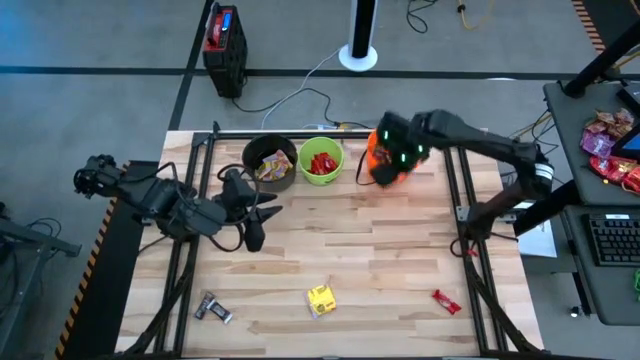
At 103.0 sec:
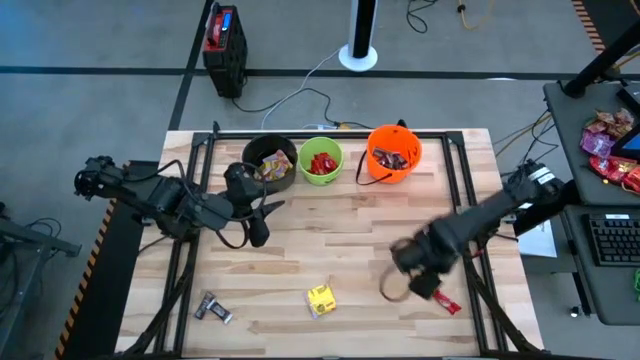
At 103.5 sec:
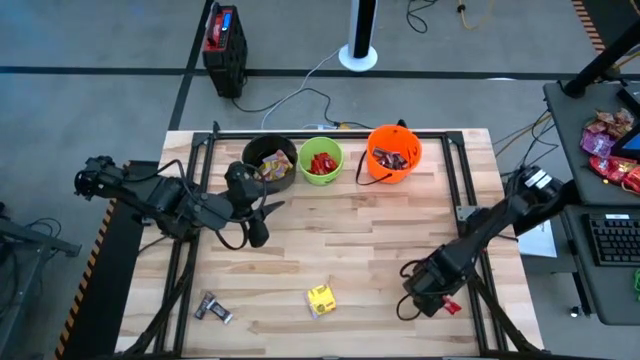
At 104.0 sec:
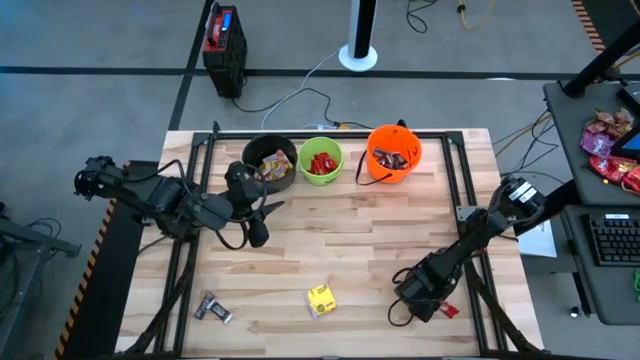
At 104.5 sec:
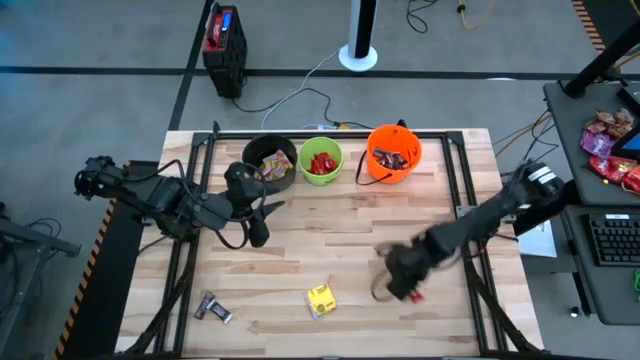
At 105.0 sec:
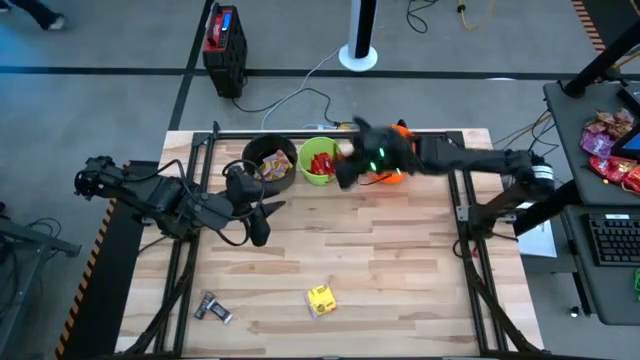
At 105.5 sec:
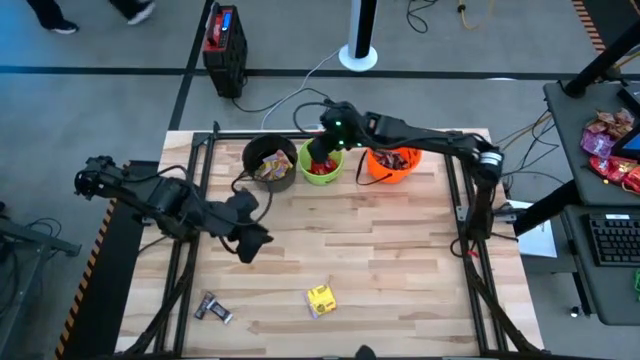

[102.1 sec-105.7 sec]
Task: Sort candy by brand, put in halloween buckets
Put the red chocolate bar into the green bucket

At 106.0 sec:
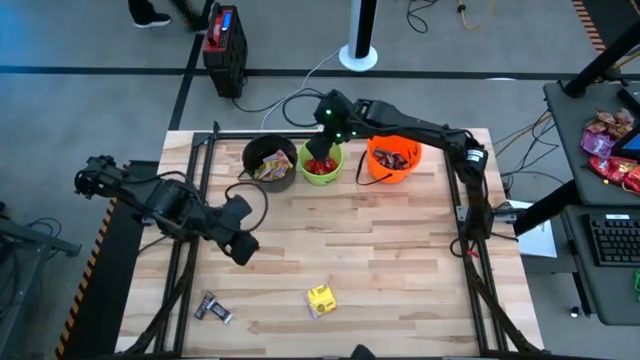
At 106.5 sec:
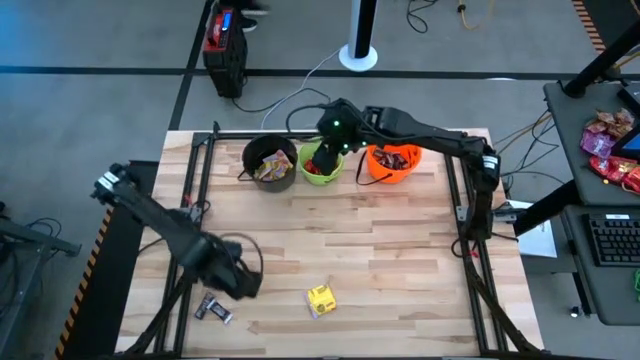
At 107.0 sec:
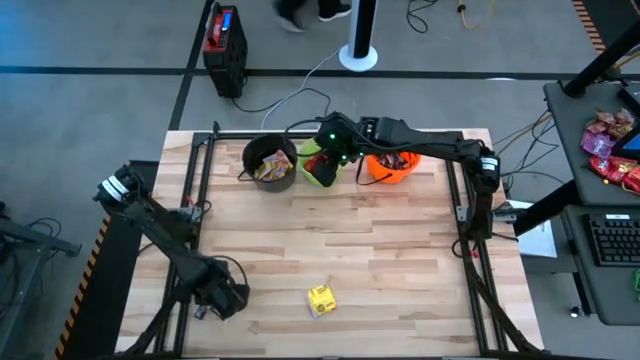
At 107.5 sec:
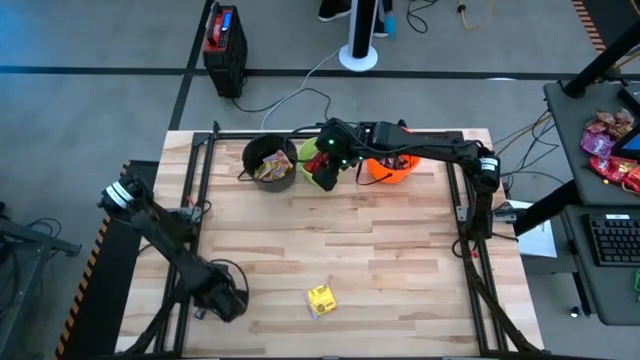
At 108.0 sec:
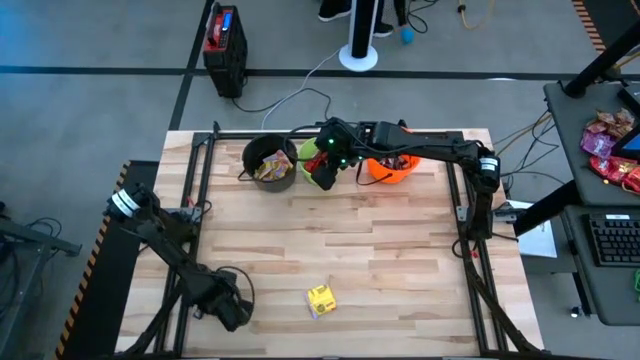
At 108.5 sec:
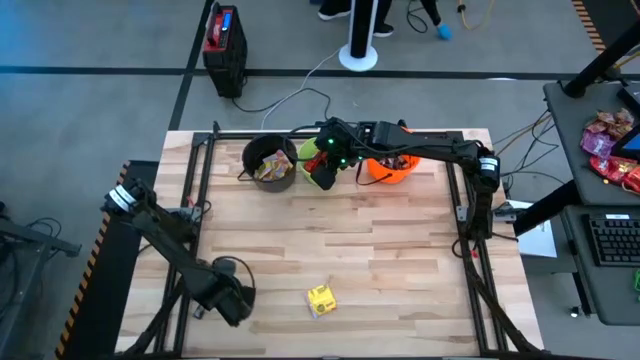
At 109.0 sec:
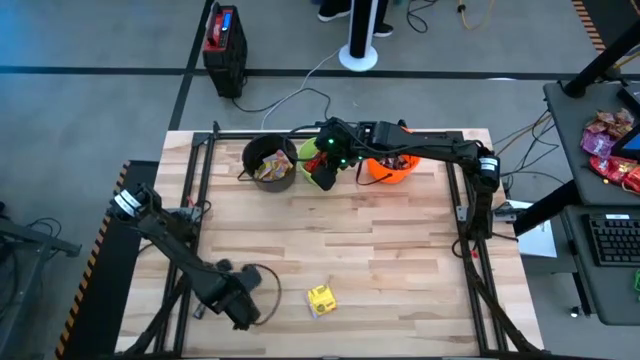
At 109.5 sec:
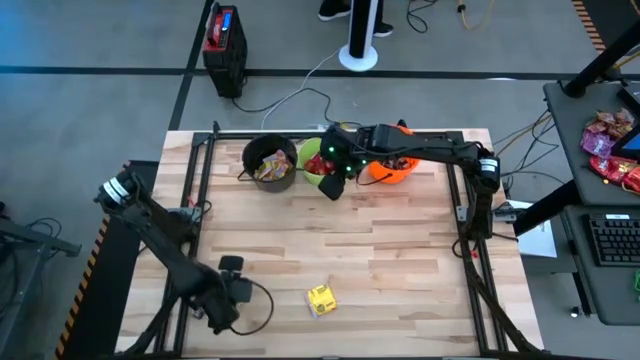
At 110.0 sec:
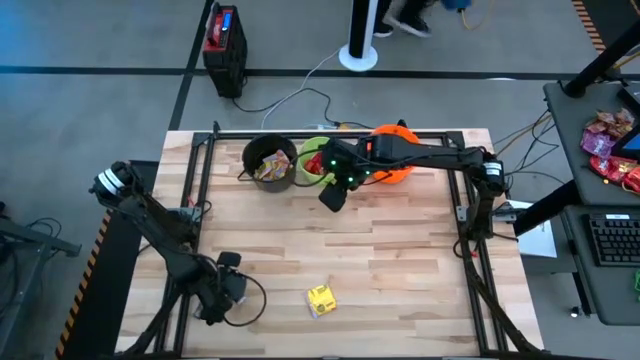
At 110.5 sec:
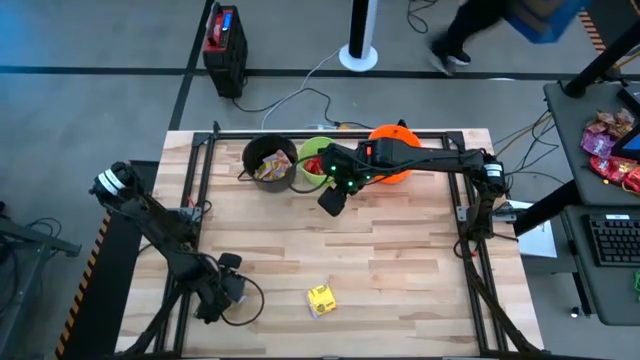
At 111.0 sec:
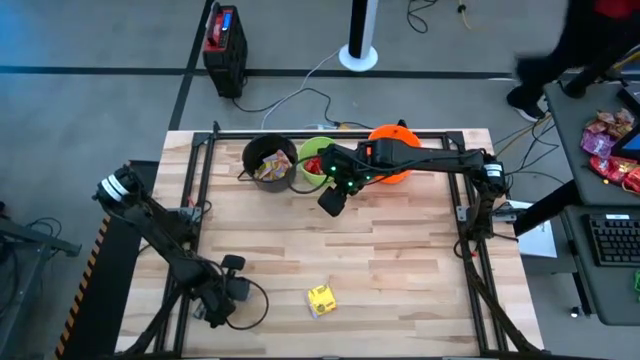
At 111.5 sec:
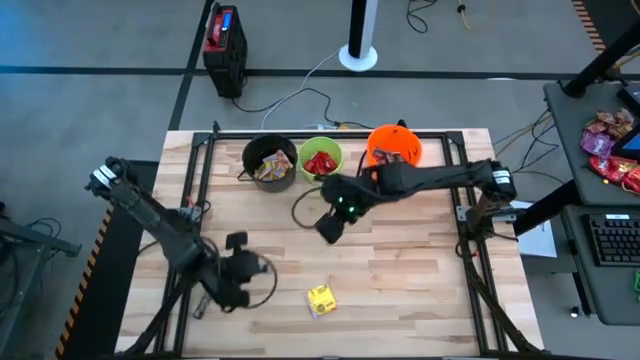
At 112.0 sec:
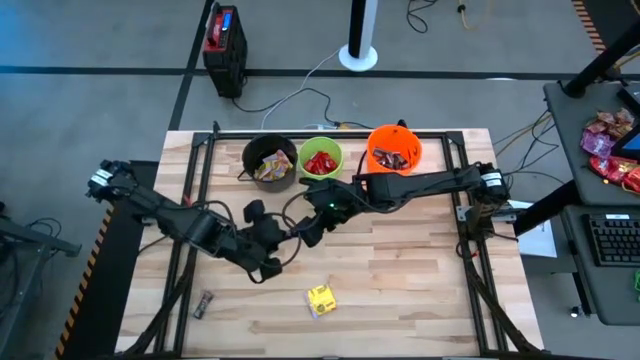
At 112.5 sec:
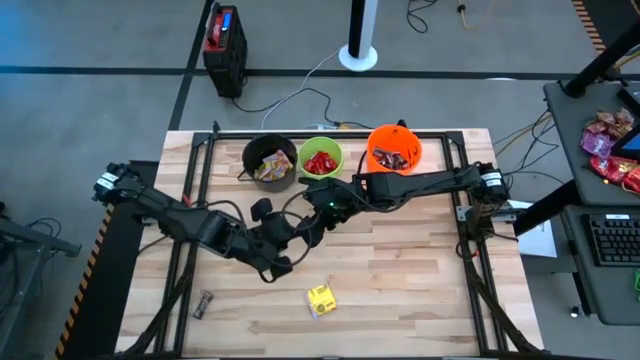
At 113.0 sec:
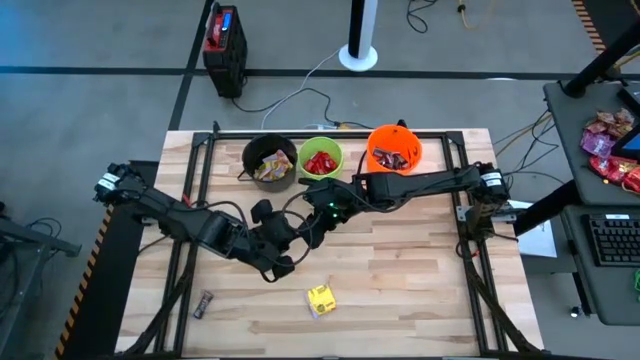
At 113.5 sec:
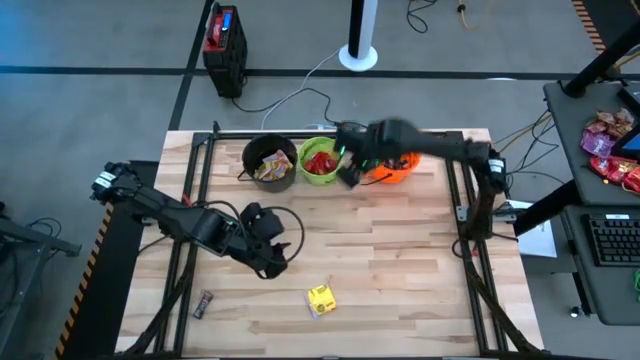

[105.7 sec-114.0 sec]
Put the brown chocolate bar into the orange bucket

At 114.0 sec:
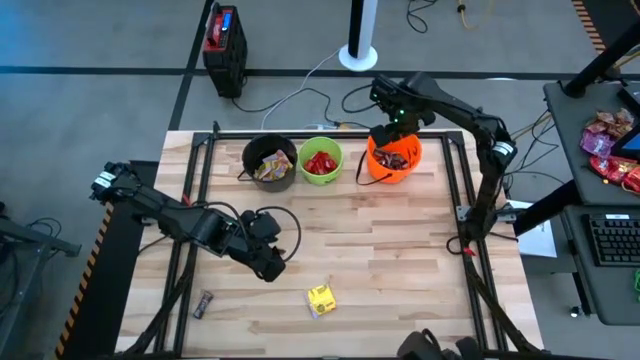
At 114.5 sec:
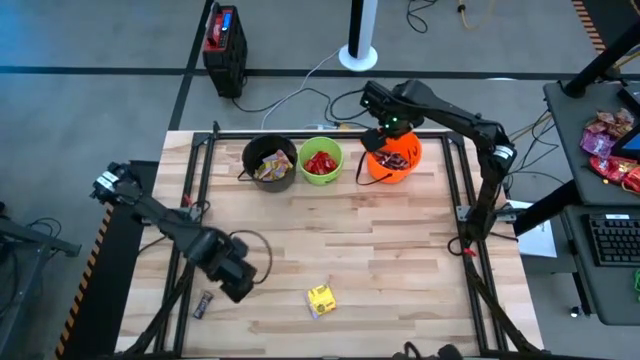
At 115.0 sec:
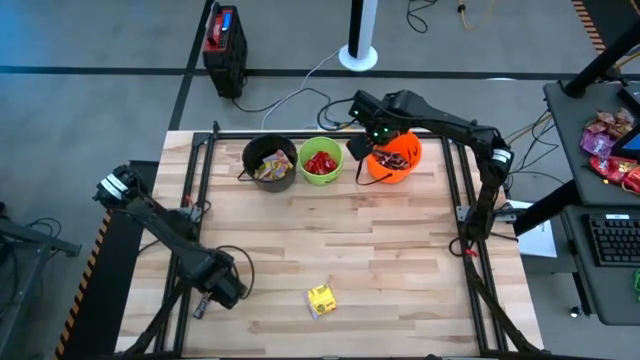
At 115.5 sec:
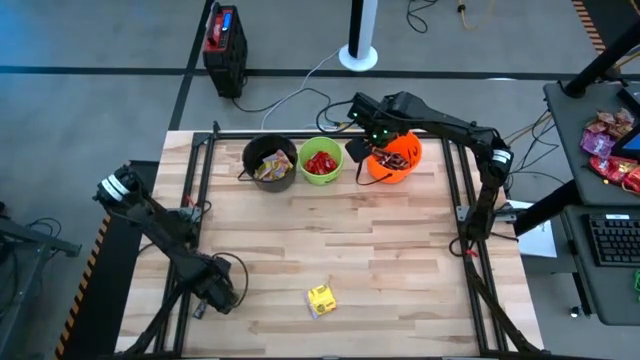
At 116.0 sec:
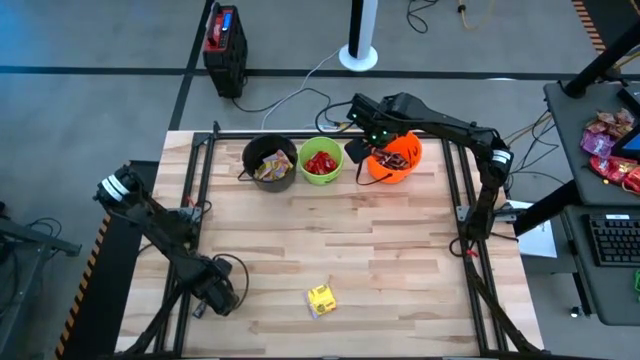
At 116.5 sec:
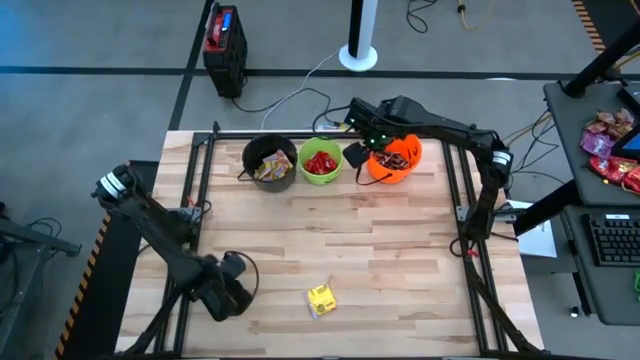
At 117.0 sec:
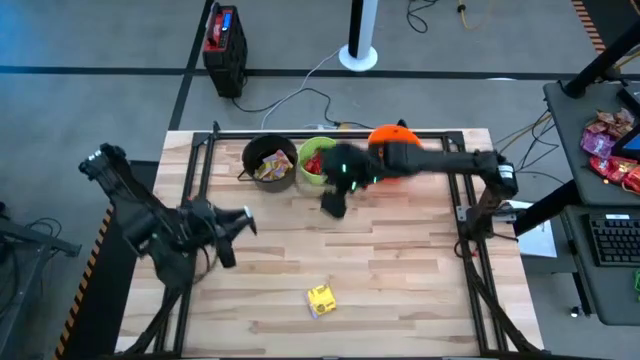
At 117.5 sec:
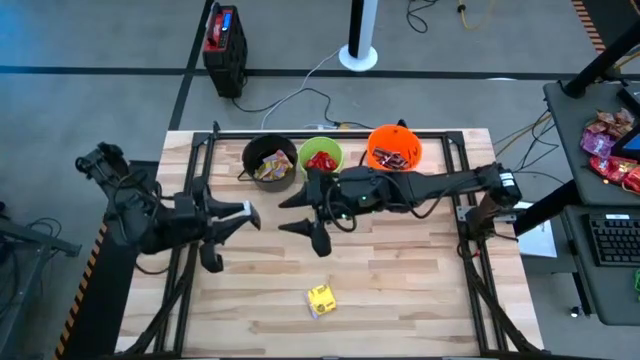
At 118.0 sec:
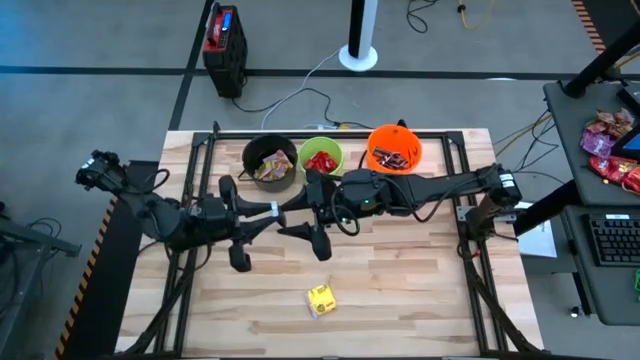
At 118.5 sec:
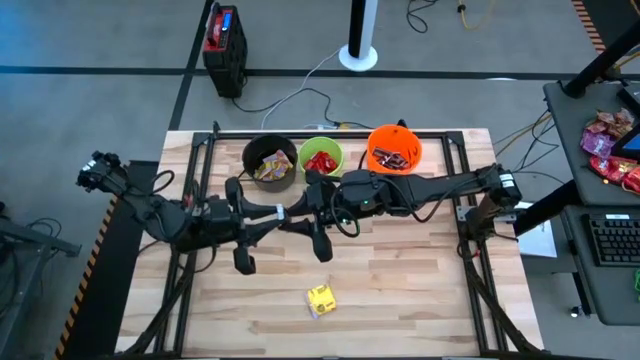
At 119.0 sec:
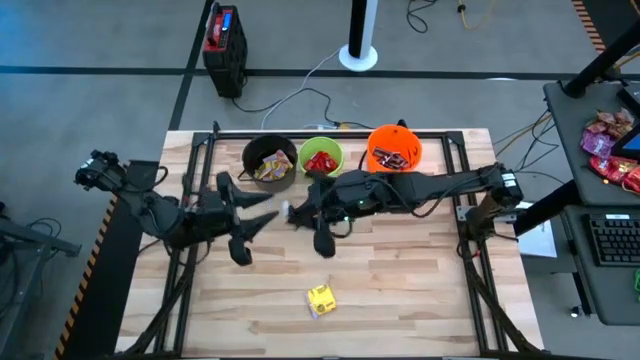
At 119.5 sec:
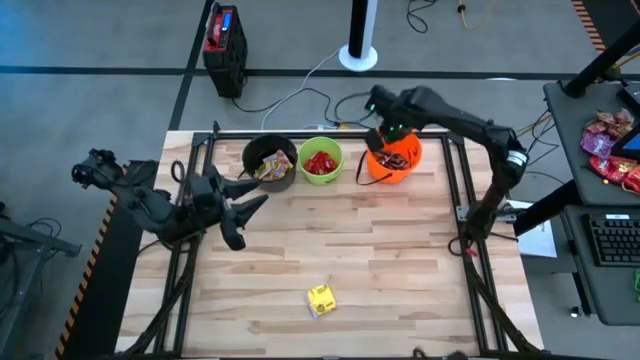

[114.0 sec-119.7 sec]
Put the brown chocolate bar into the orange bucket

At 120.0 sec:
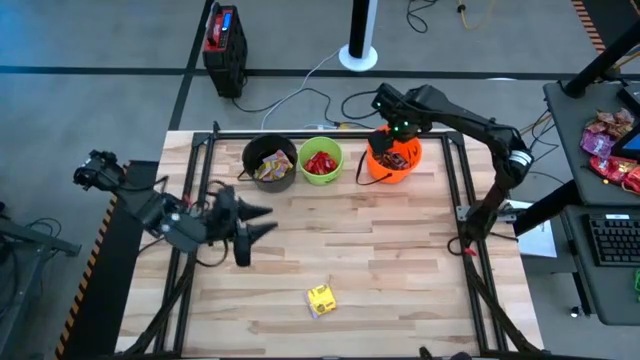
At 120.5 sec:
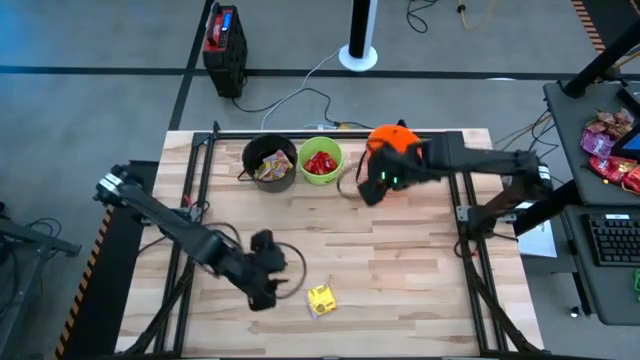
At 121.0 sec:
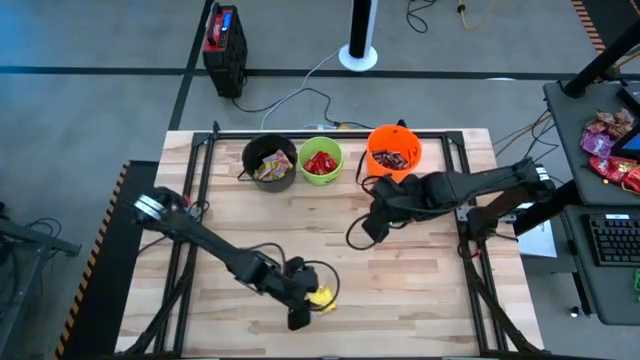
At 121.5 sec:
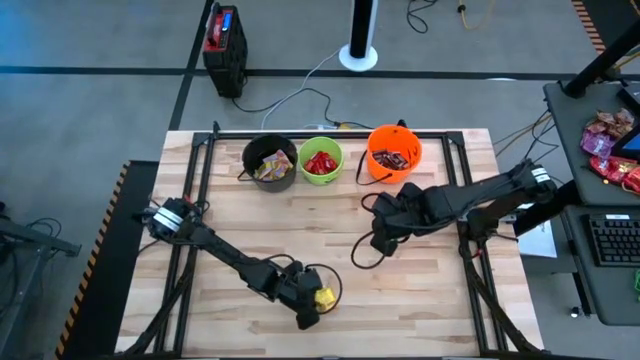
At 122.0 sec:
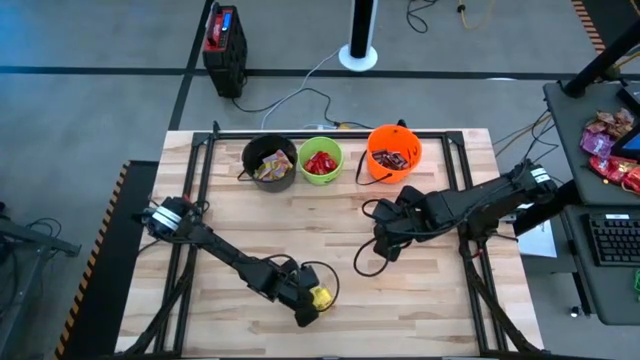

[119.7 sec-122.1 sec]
Put the yellow candy into the black bucket

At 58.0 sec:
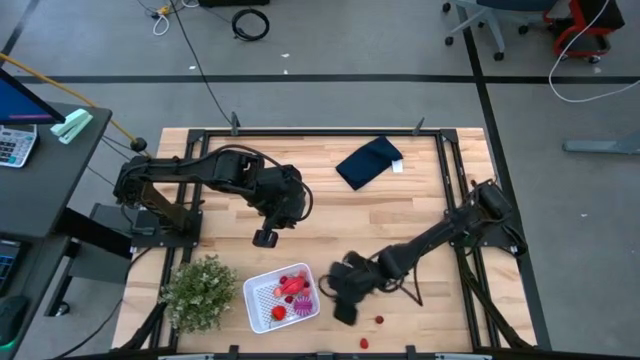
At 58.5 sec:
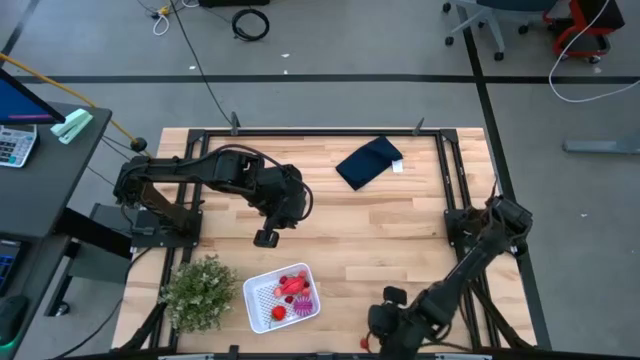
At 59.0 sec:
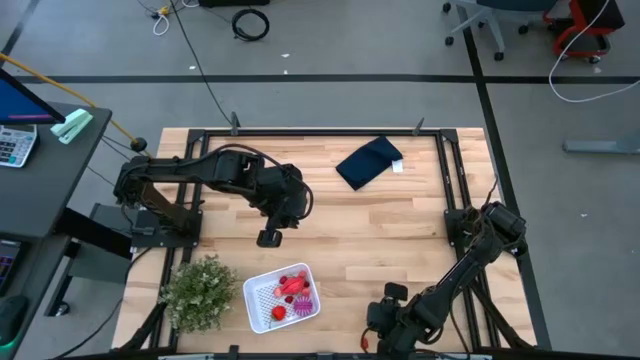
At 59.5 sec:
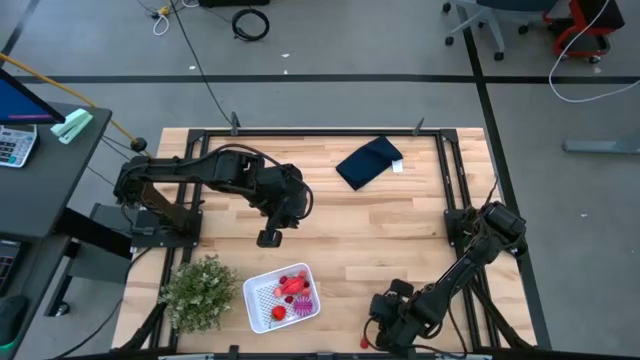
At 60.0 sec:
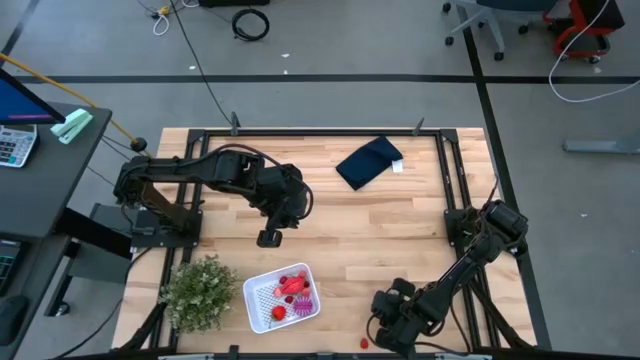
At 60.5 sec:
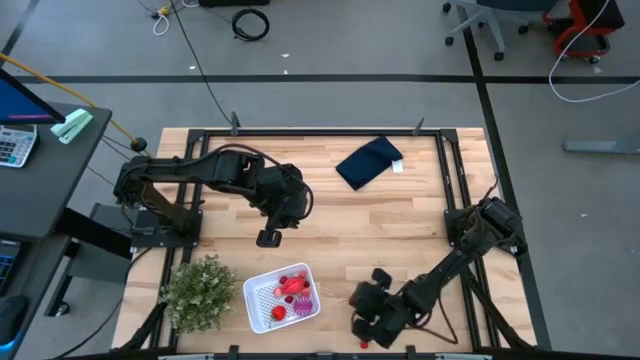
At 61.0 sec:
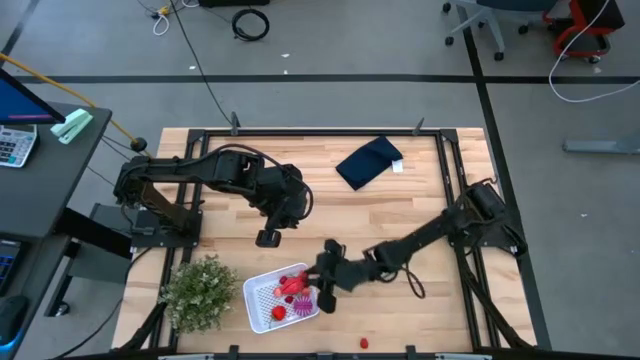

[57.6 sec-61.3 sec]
Task: Pick and placing Produce into tupperware
Put the cherry into the white bin
